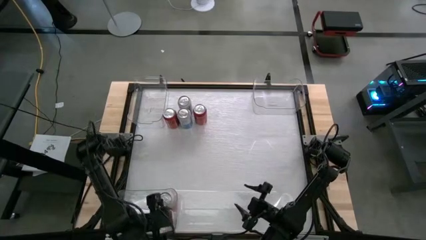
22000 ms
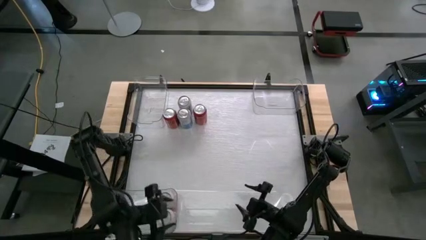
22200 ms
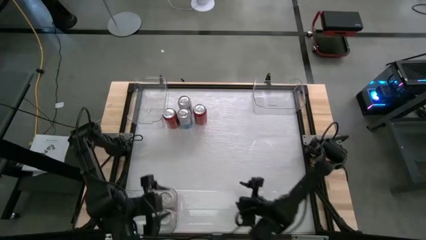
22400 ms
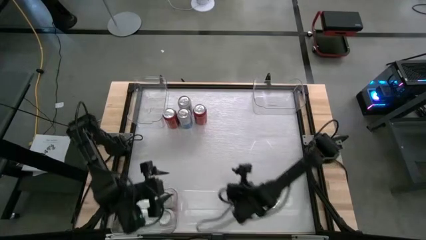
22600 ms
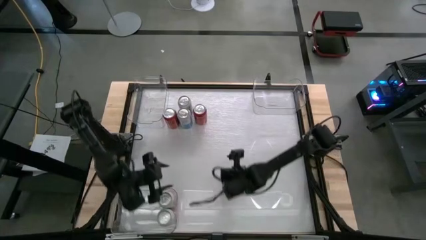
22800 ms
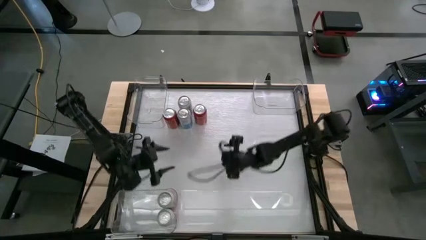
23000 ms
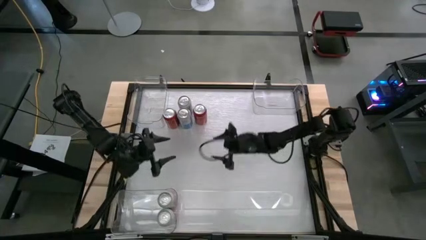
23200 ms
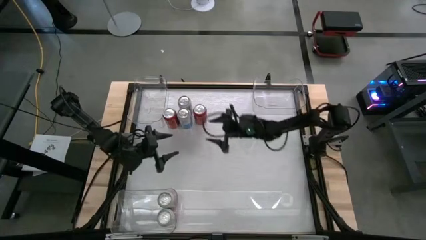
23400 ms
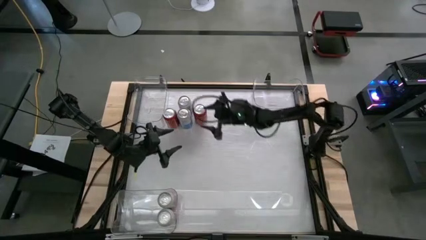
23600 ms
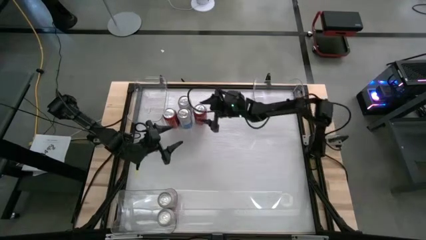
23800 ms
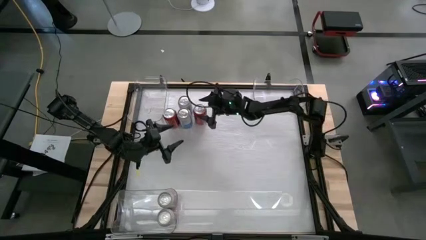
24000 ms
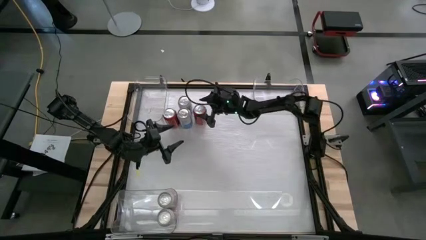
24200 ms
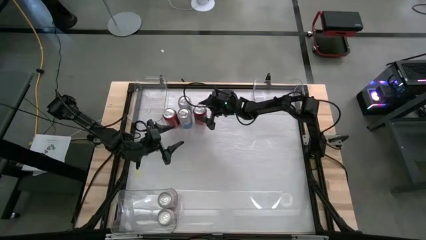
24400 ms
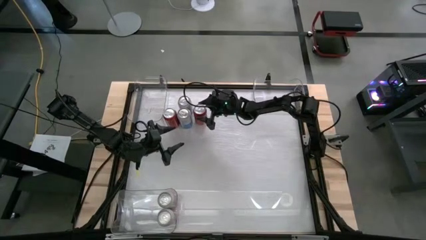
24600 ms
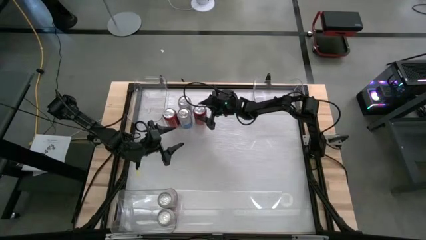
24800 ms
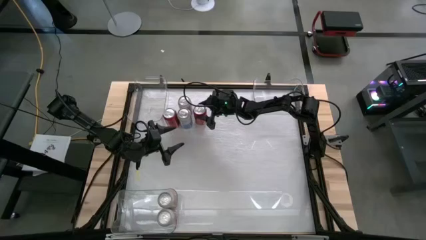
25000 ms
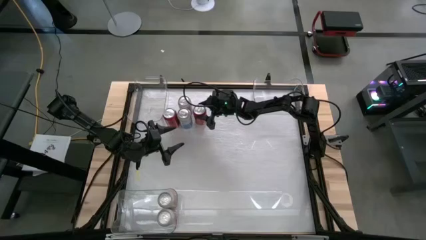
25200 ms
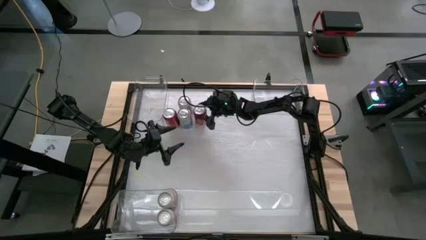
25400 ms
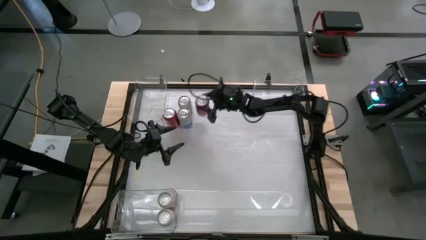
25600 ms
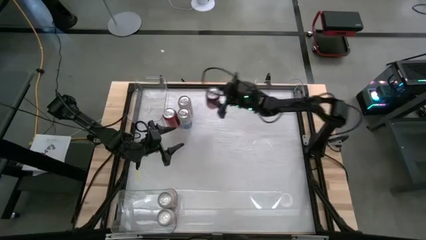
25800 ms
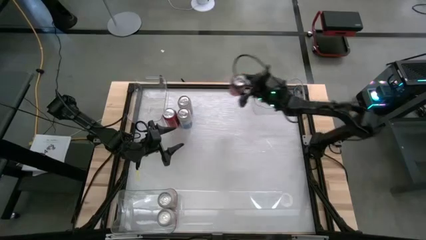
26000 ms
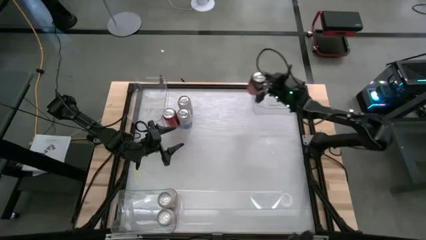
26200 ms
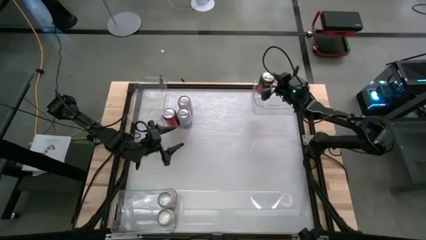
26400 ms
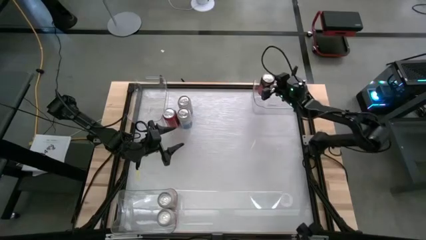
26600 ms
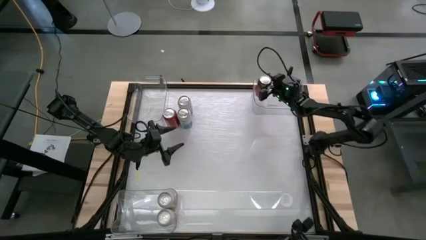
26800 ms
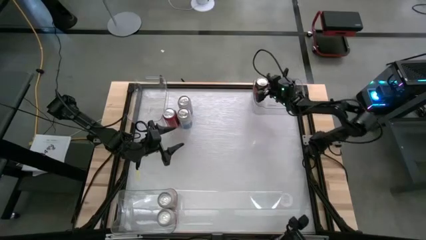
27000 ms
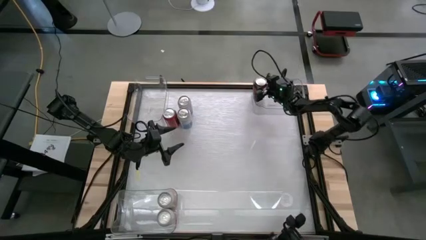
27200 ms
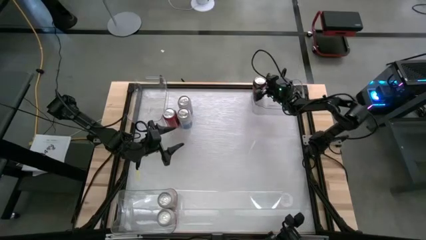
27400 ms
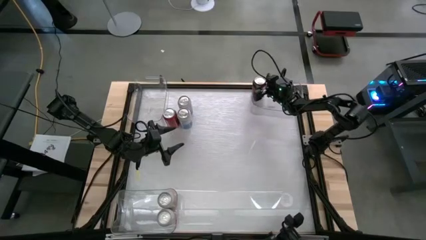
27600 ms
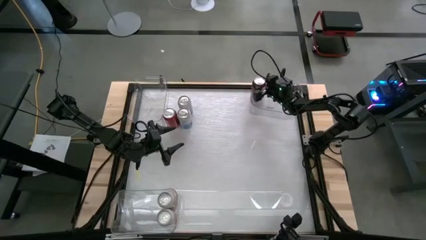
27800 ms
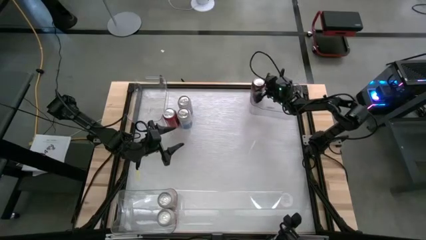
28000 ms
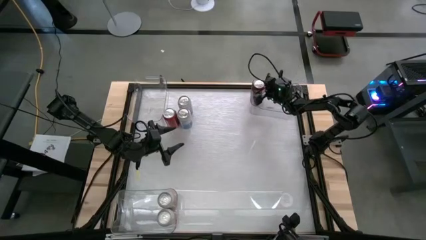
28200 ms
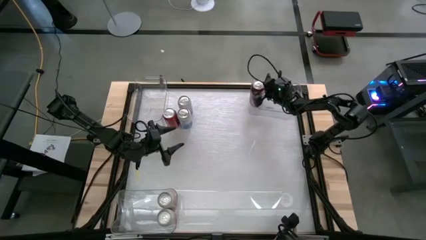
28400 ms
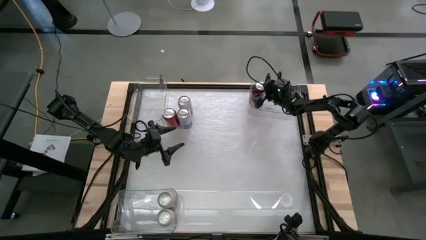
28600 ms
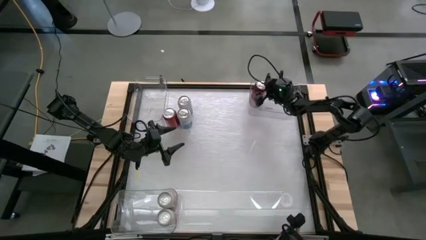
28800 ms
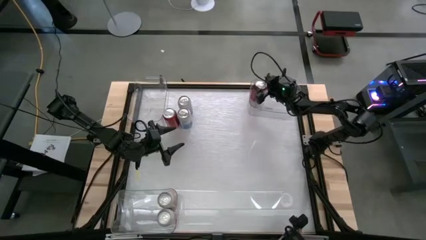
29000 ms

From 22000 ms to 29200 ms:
Task: Sort soda cans
Put the right red/black soda can into the right transparent bin

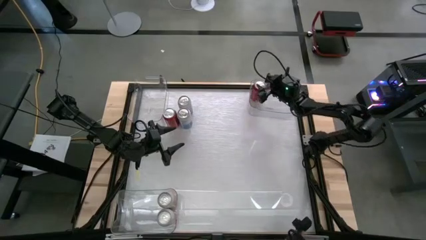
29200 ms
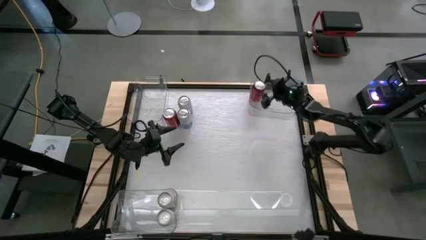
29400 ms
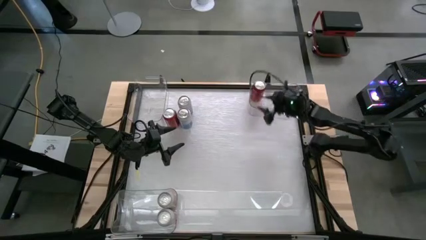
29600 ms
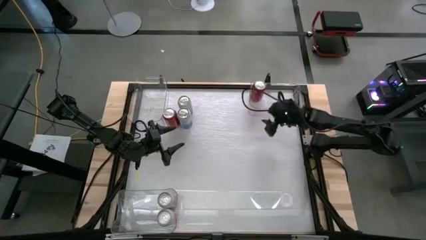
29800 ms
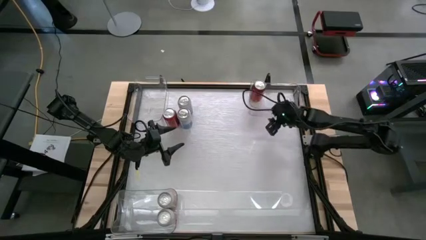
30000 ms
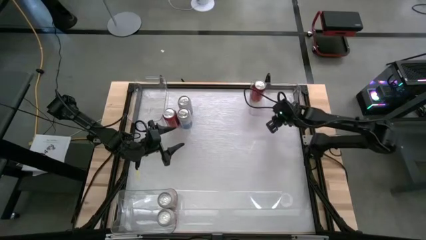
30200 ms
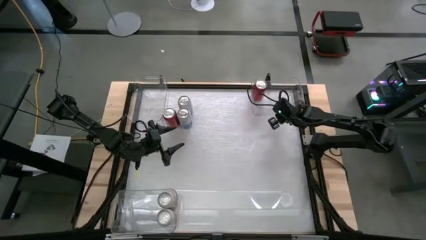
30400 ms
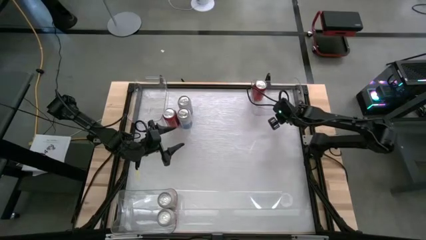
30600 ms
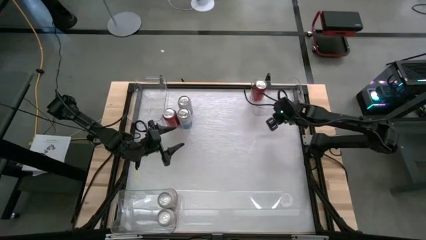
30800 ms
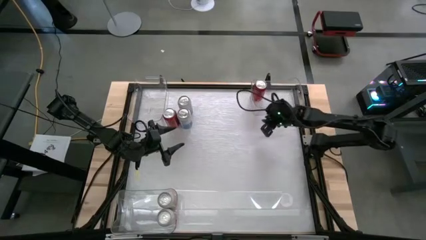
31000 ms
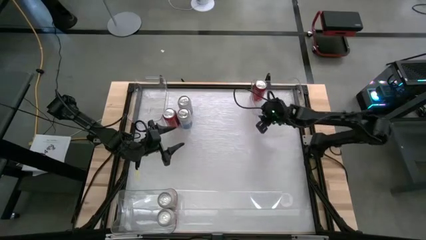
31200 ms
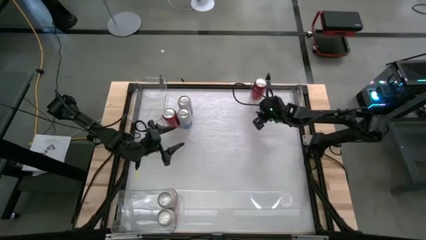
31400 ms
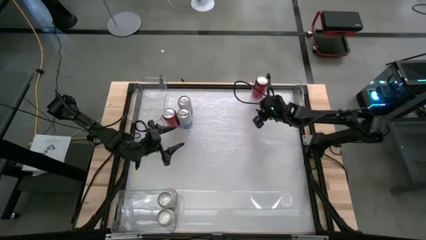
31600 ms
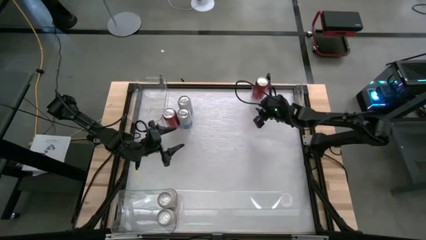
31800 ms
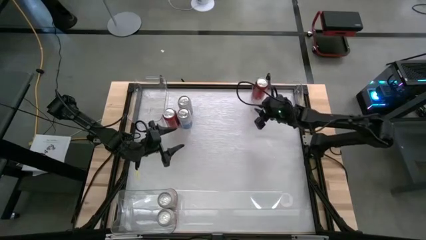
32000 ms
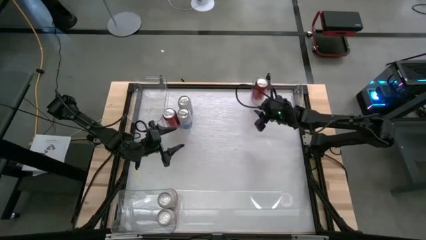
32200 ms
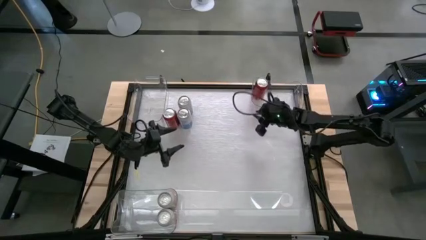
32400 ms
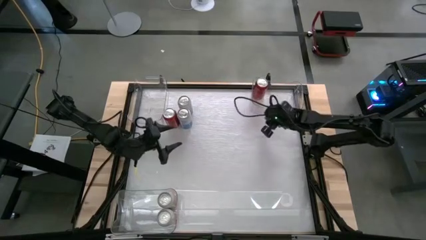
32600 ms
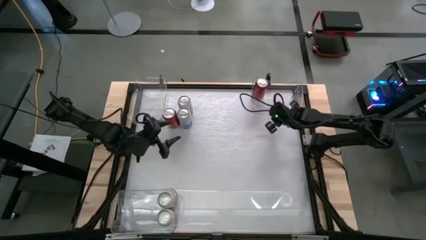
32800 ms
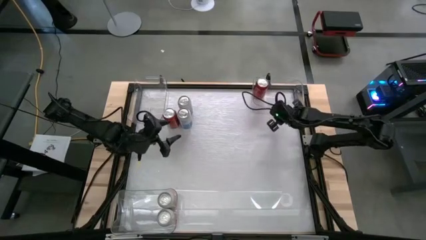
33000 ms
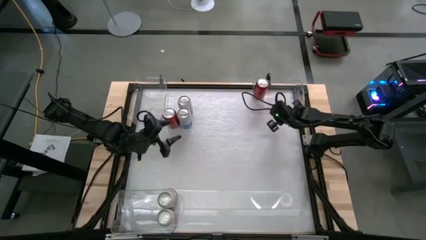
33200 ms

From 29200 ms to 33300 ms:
Adjust the right transparent bin
